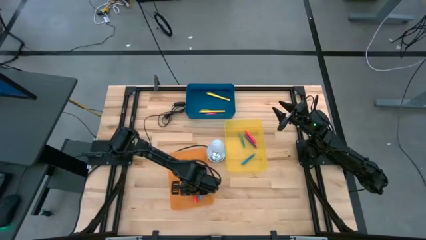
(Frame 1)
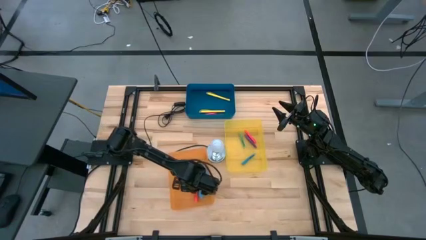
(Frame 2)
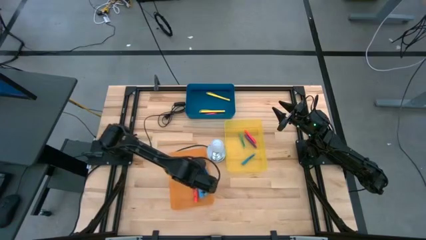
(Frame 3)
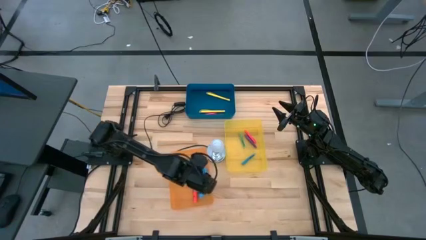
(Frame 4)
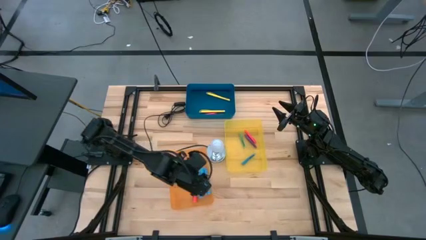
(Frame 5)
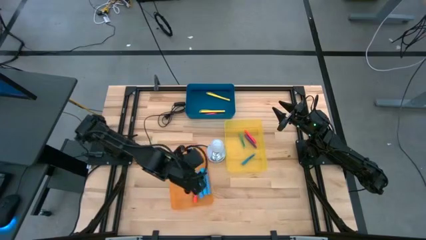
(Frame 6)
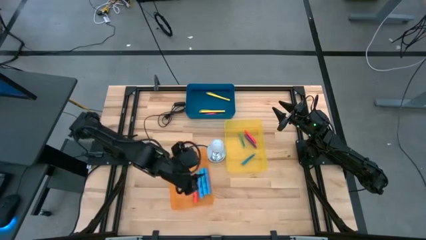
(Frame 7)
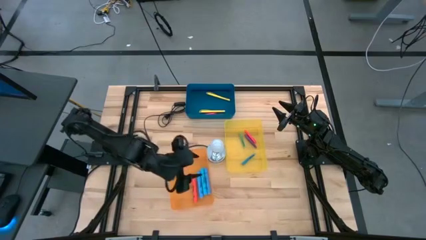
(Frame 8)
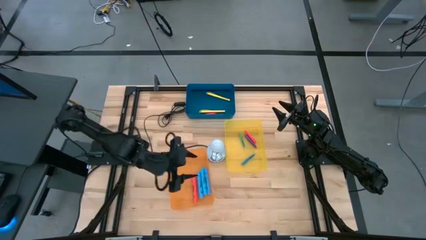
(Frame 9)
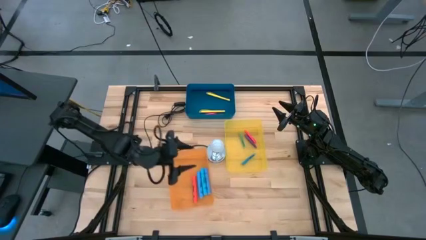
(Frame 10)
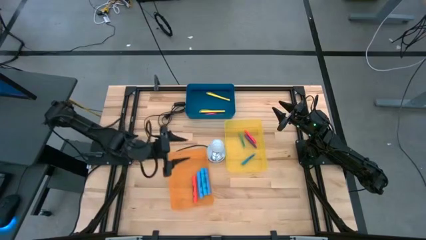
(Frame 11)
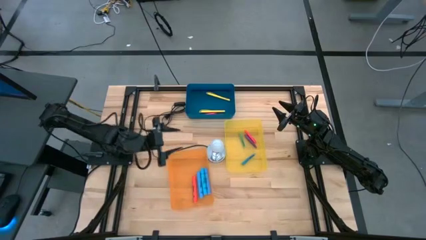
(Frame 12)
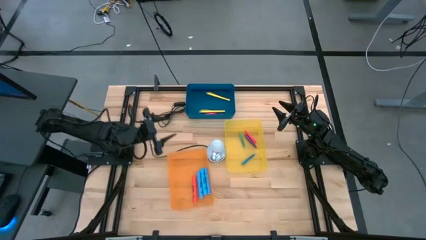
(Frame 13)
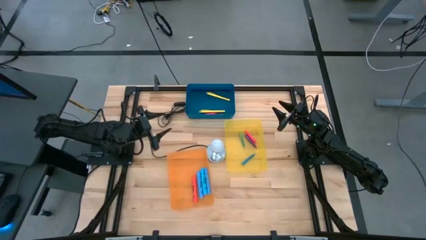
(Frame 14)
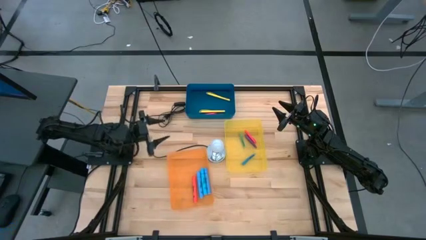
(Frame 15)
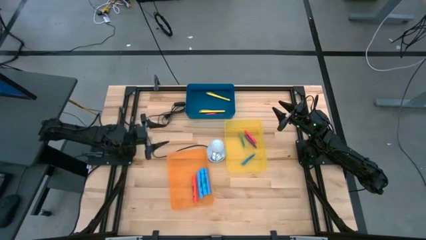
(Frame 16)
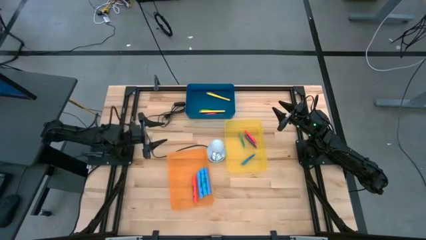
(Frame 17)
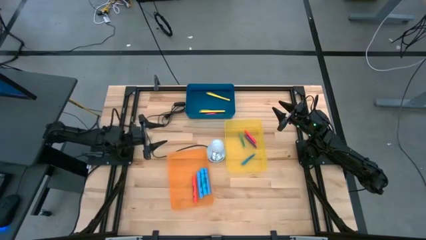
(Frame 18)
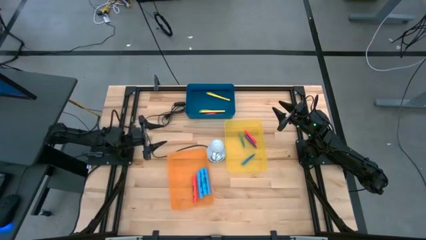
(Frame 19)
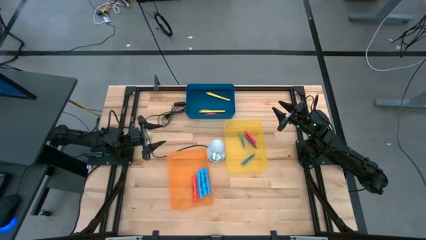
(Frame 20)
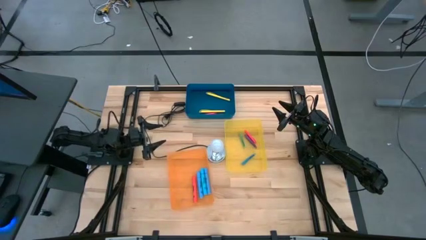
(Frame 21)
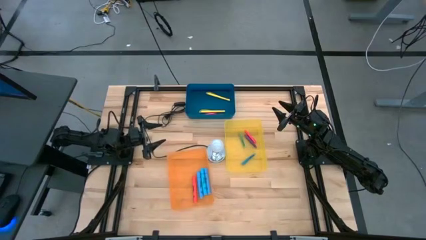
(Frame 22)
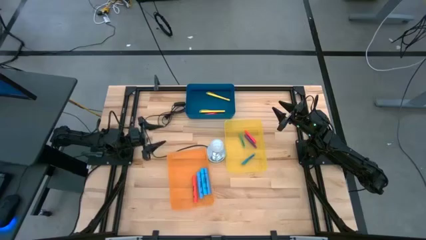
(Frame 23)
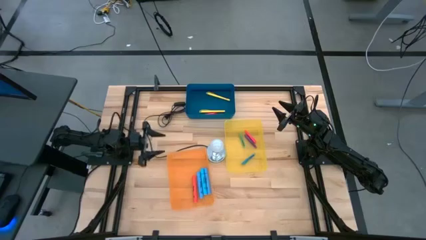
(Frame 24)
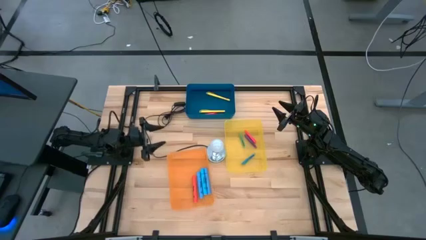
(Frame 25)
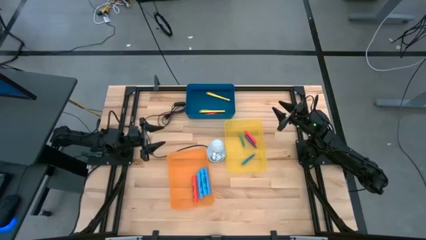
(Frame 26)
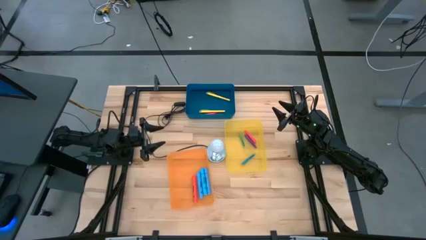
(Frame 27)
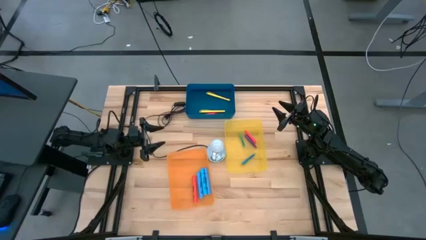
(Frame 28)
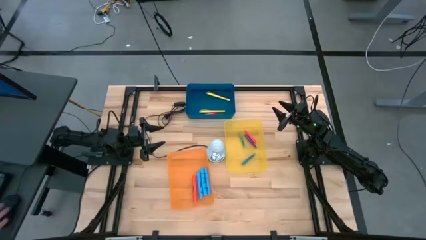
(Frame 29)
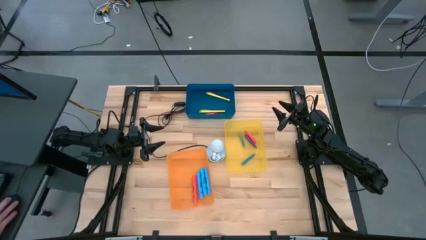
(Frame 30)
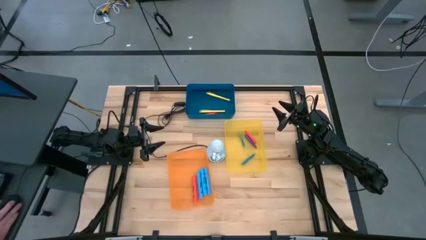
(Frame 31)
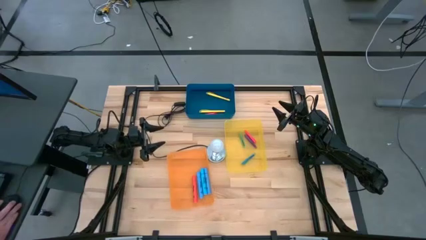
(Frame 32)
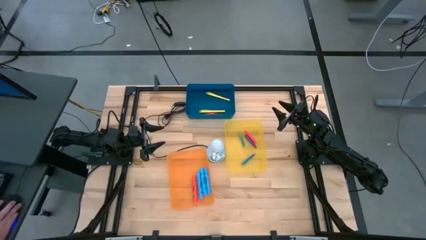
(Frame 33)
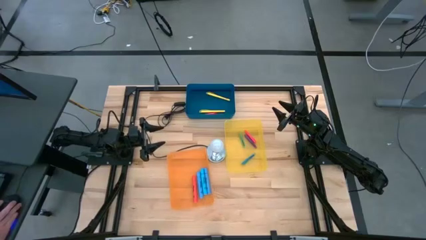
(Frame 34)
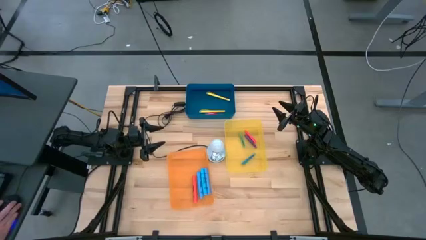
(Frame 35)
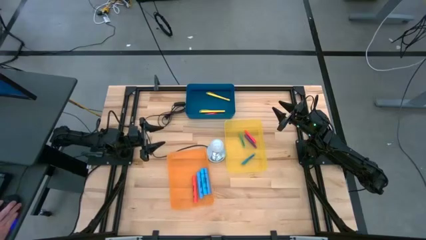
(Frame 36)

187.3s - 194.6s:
Task: Pick & Place Markers
Return to Home Position

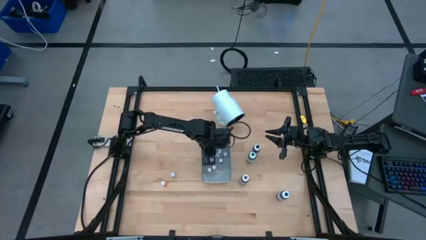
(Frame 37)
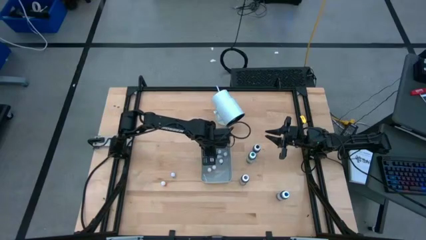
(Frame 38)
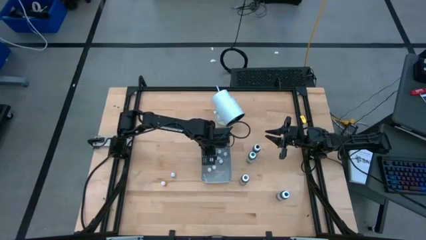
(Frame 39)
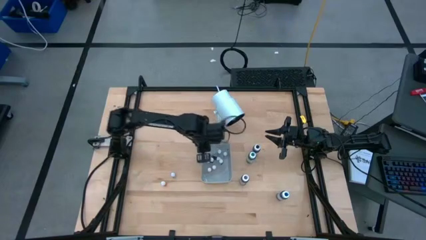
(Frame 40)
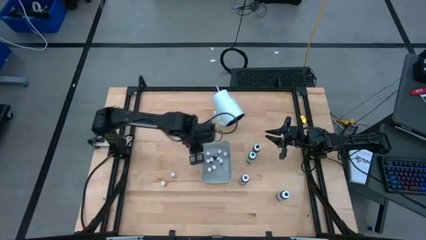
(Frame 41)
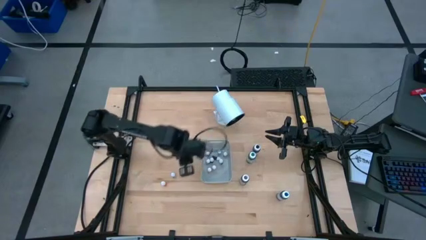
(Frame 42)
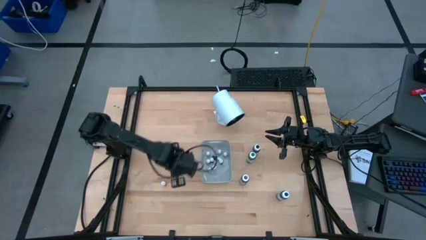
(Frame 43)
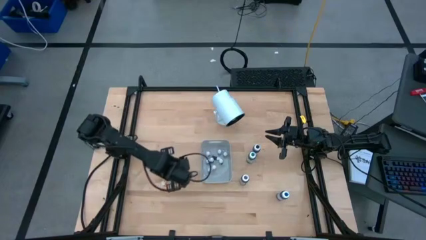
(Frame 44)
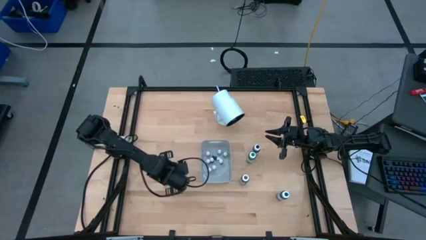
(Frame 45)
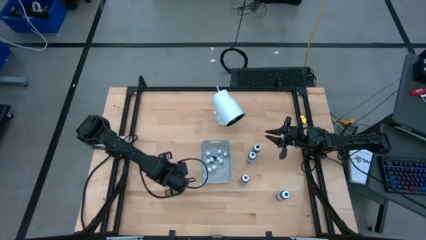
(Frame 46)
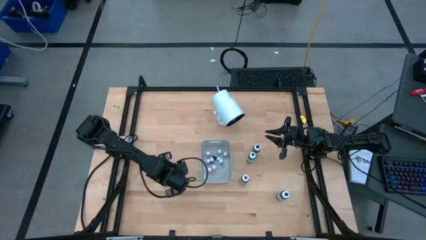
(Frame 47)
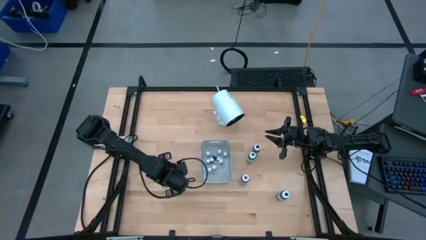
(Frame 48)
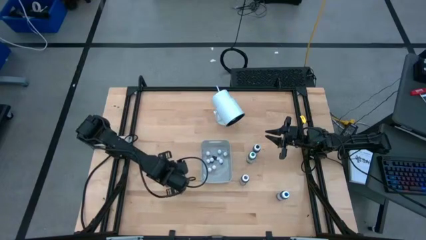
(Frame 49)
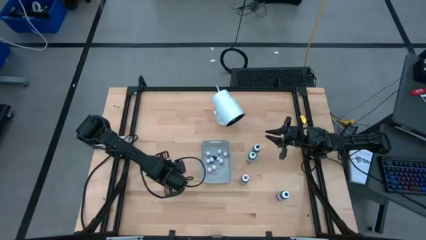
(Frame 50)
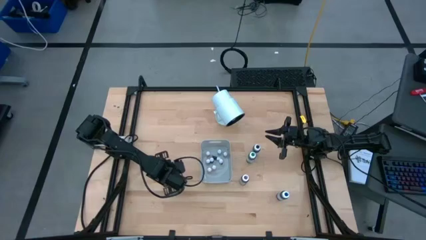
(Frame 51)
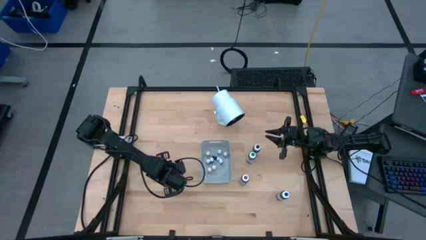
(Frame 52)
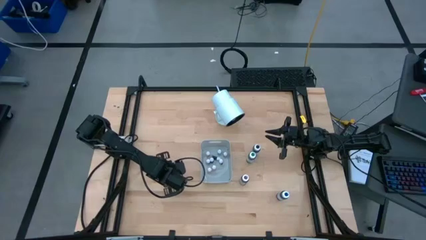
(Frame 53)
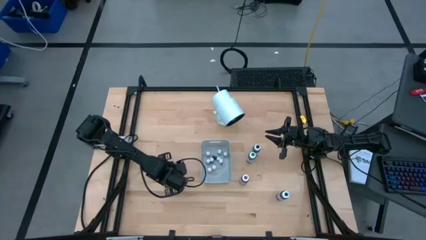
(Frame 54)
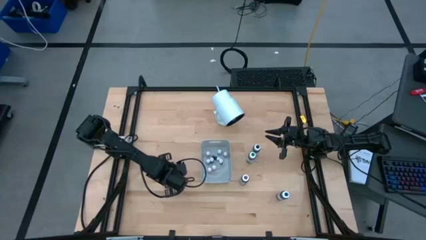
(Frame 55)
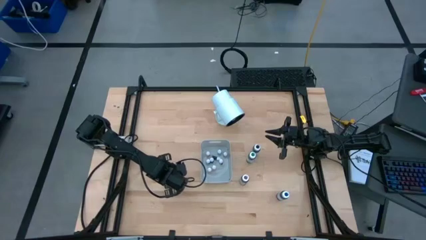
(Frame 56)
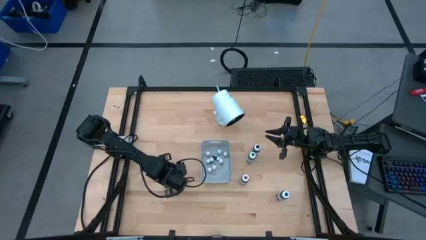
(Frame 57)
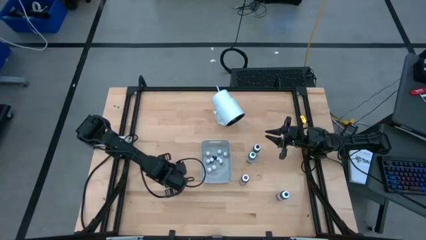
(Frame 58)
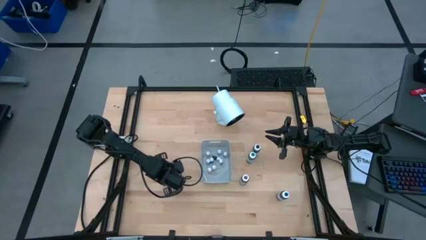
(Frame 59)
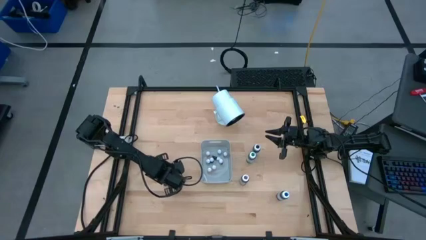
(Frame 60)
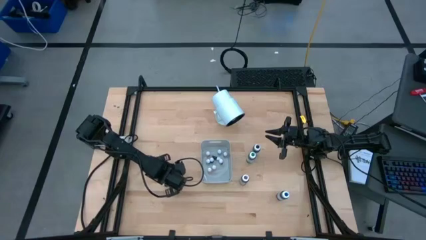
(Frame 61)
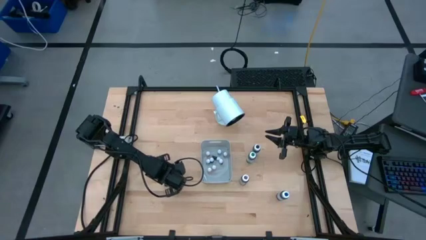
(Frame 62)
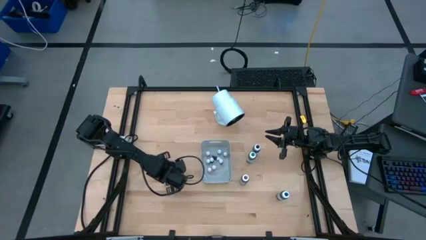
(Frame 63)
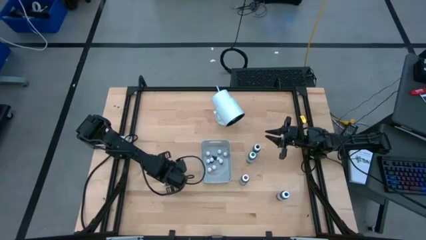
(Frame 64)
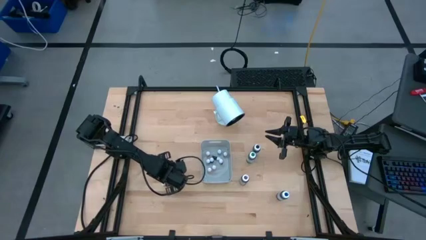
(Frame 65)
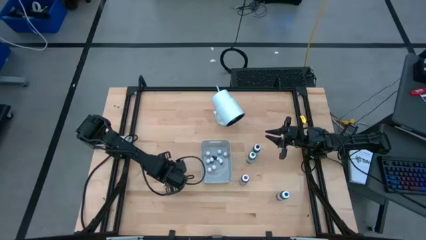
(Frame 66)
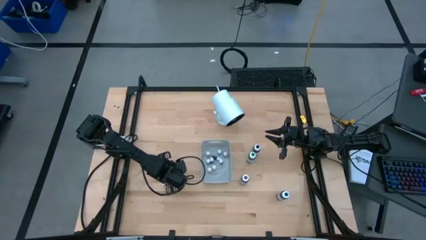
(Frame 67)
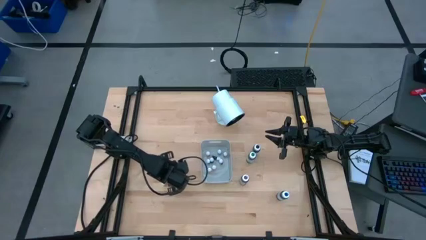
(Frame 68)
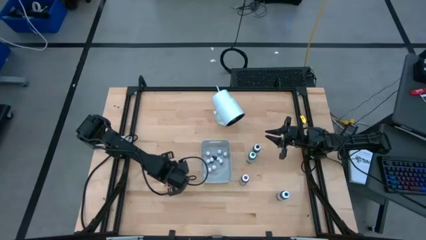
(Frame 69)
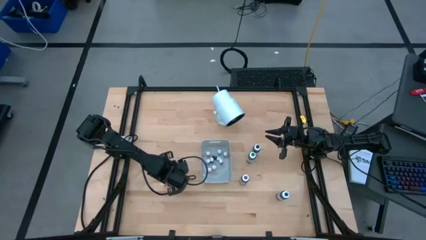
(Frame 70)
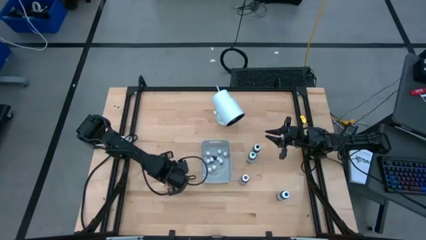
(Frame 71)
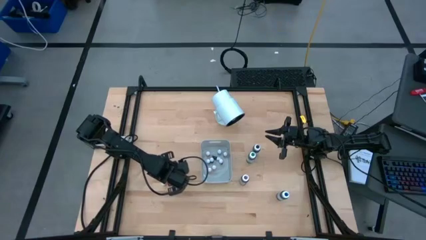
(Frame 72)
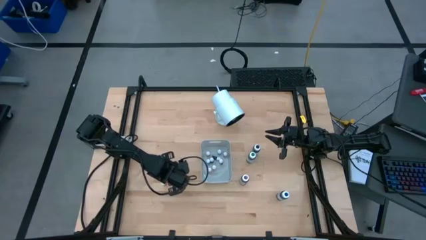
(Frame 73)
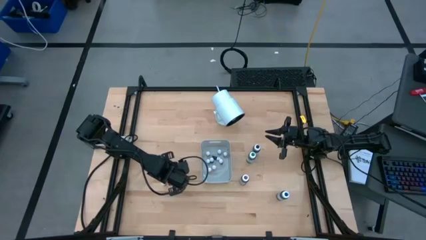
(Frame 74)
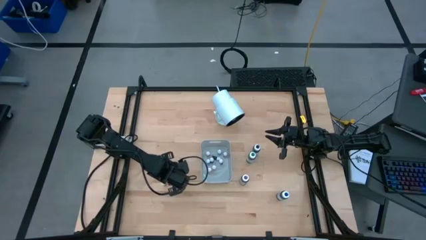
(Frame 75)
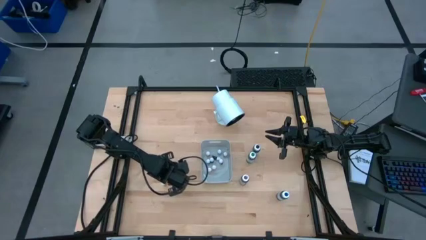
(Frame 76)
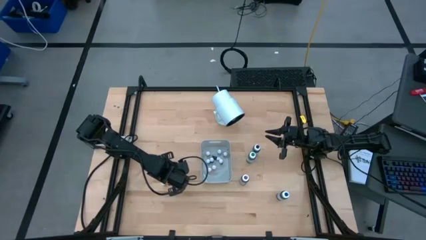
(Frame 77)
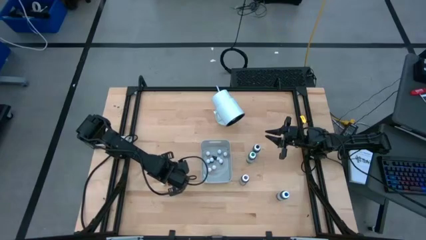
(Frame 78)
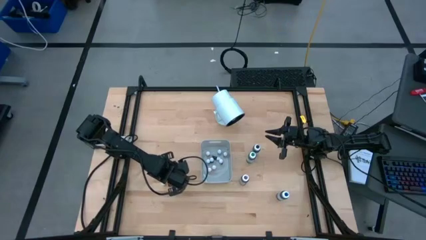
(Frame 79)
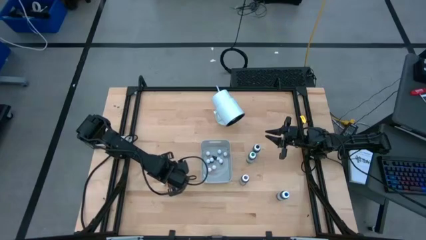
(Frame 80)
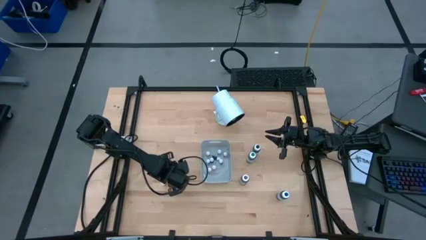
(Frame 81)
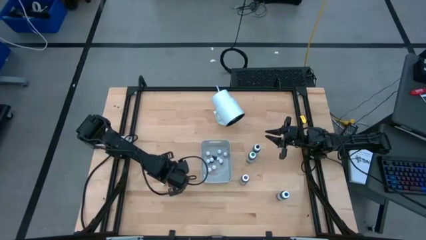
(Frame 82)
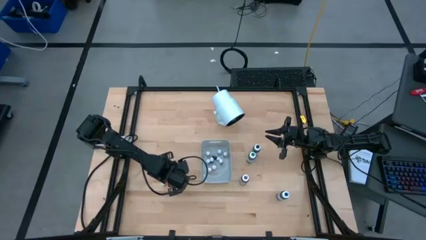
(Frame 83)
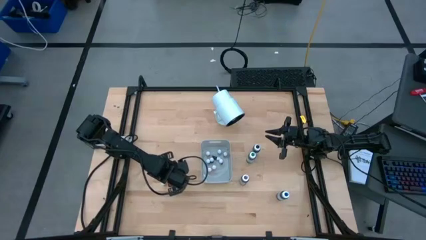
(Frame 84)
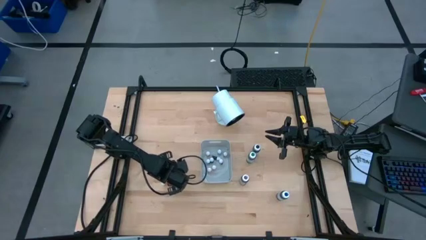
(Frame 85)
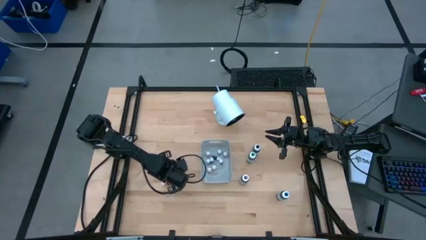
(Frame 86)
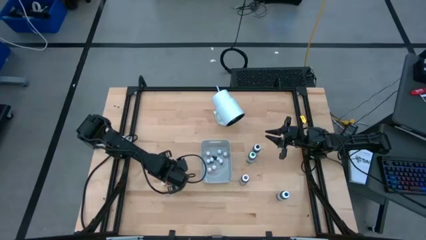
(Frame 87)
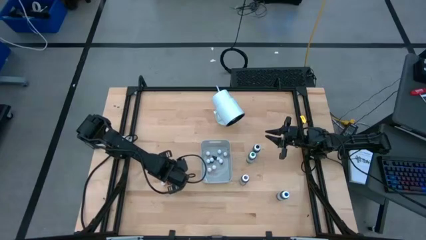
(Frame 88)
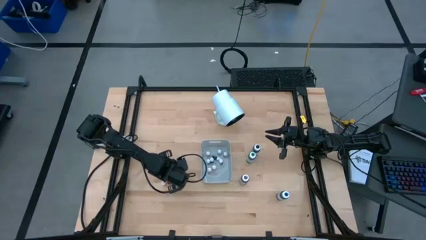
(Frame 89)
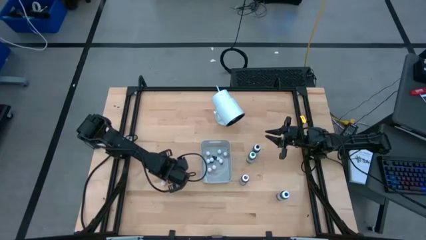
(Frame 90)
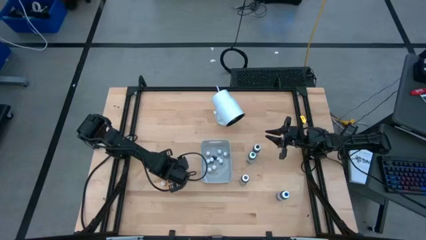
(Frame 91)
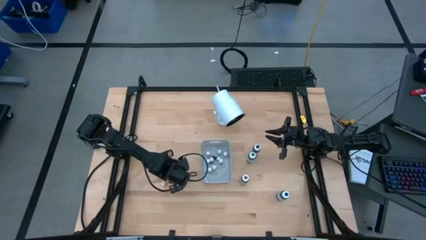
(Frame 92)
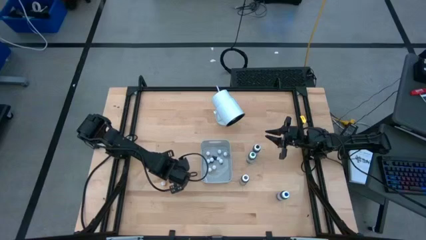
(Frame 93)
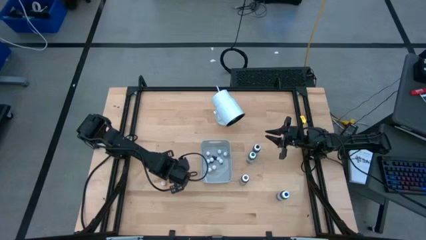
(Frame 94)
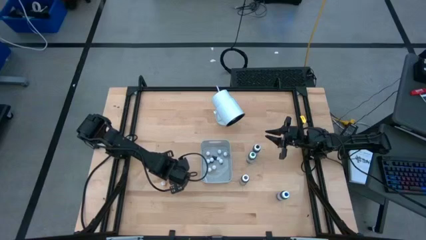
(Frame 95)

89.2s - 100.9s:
Task: Pick & Place food coloring
Put the small blue food coloring bottle into the gray bin
